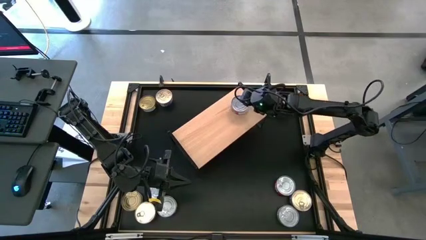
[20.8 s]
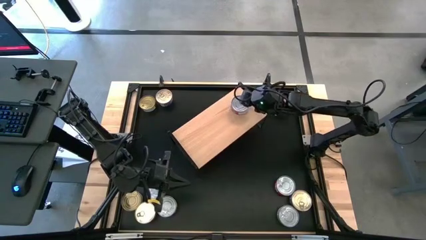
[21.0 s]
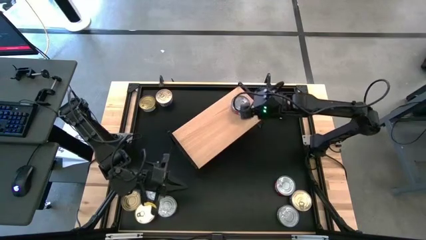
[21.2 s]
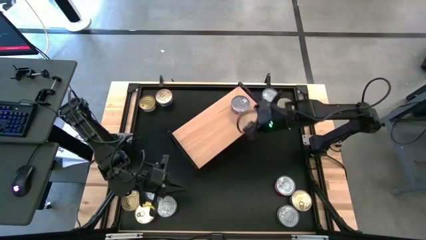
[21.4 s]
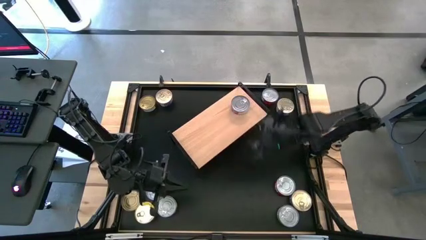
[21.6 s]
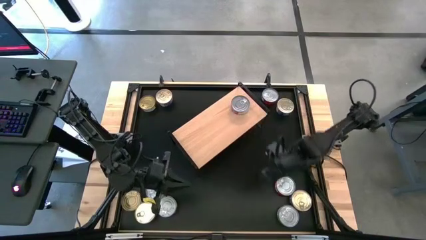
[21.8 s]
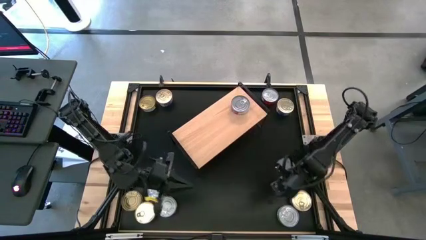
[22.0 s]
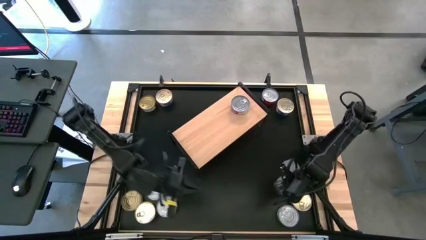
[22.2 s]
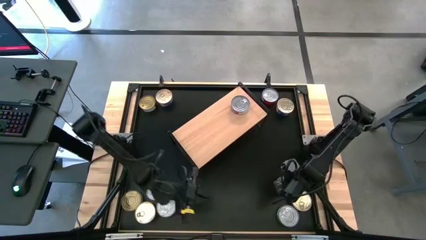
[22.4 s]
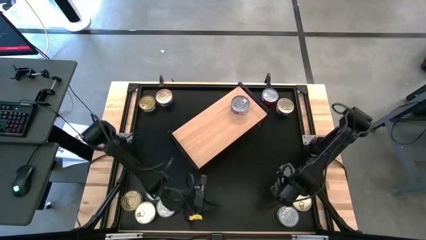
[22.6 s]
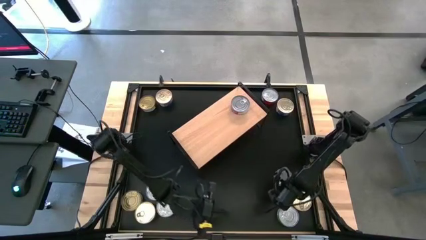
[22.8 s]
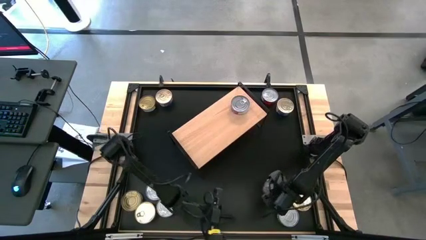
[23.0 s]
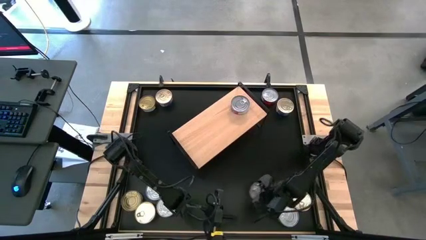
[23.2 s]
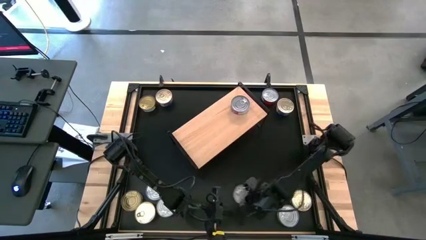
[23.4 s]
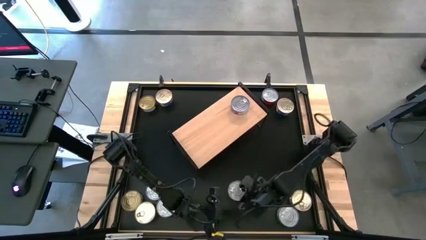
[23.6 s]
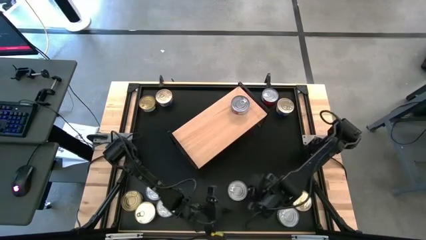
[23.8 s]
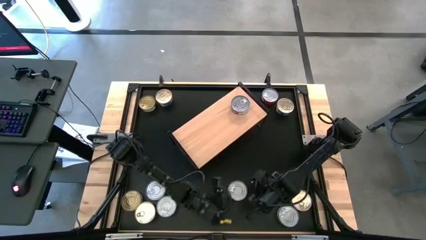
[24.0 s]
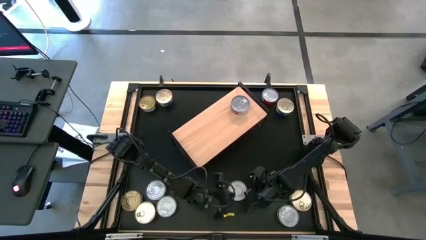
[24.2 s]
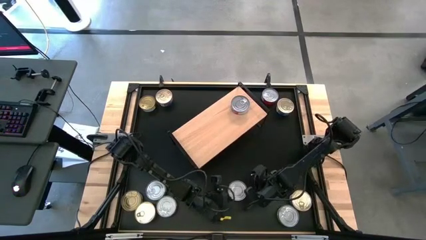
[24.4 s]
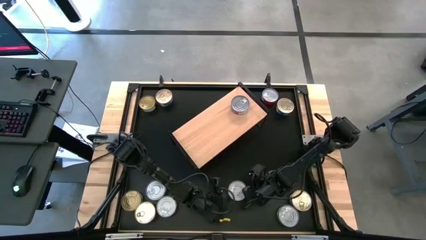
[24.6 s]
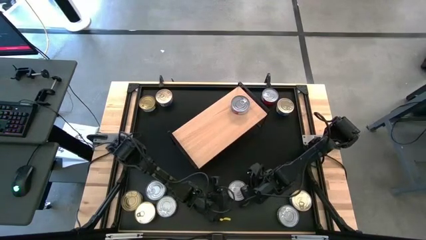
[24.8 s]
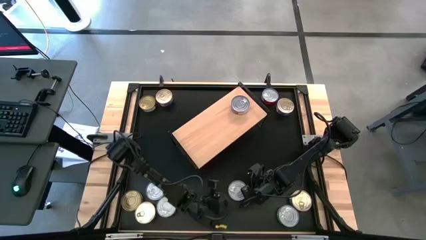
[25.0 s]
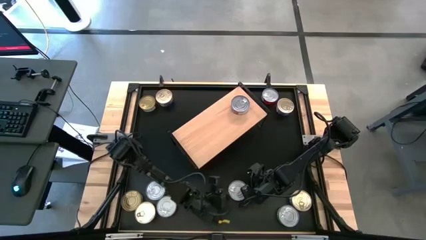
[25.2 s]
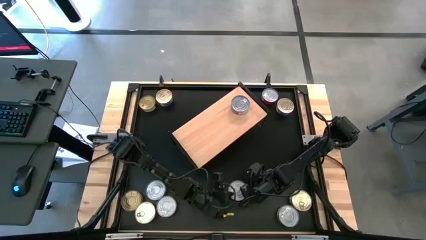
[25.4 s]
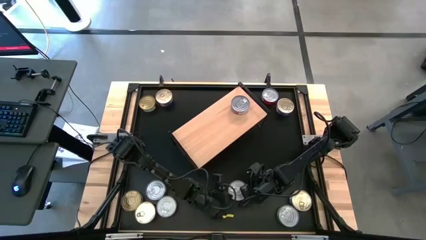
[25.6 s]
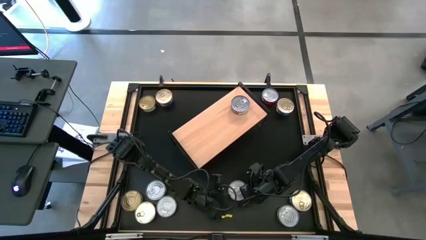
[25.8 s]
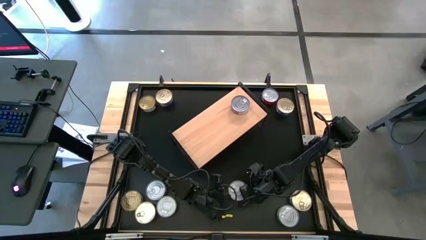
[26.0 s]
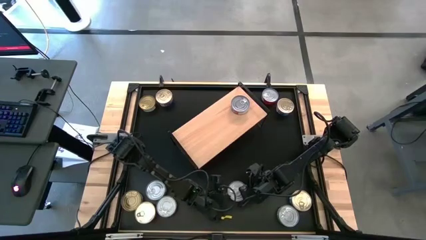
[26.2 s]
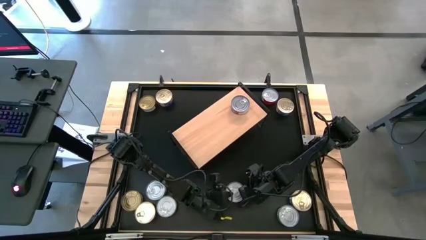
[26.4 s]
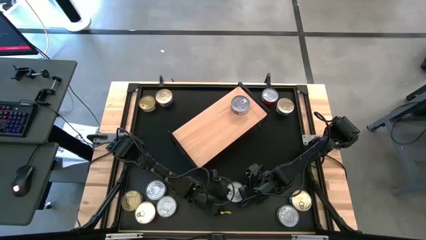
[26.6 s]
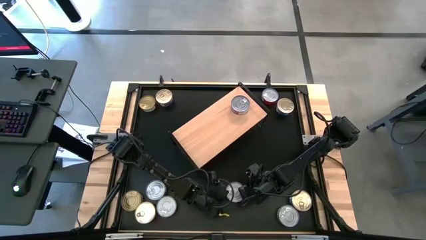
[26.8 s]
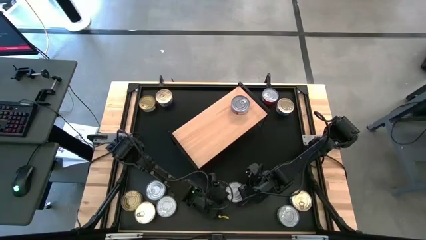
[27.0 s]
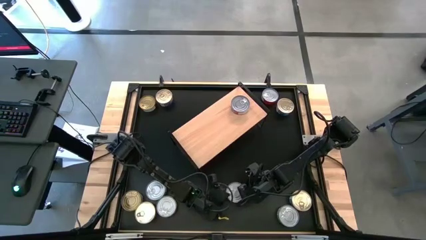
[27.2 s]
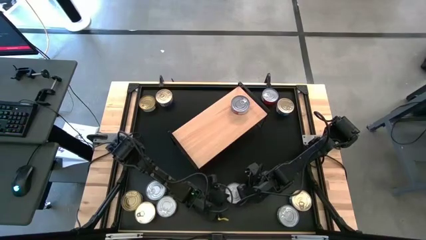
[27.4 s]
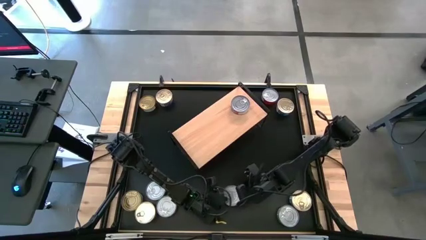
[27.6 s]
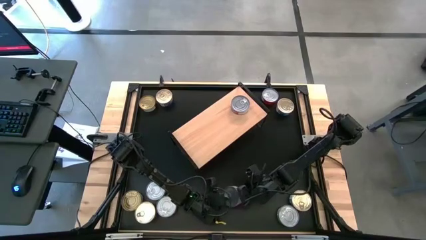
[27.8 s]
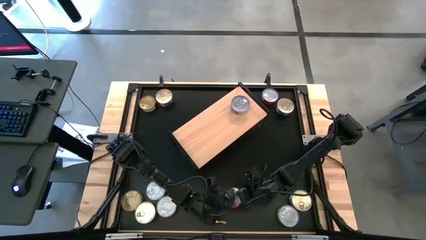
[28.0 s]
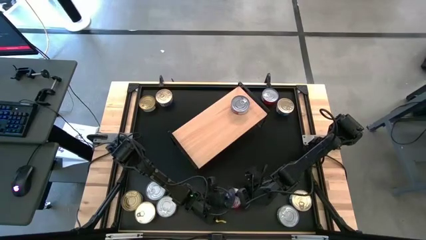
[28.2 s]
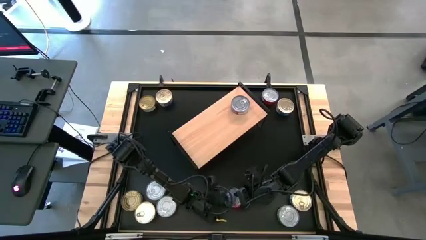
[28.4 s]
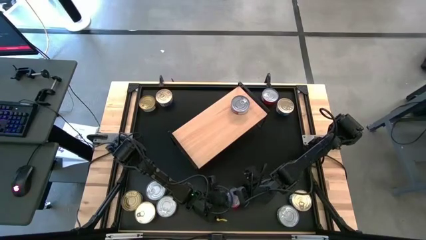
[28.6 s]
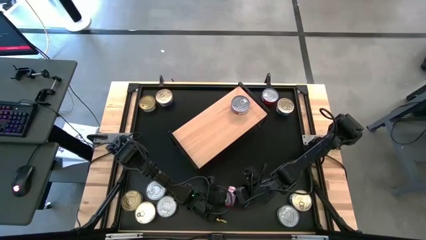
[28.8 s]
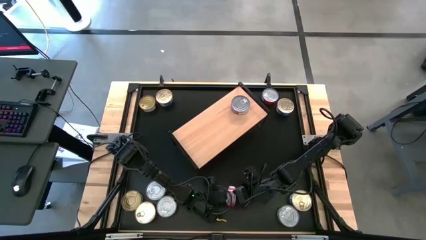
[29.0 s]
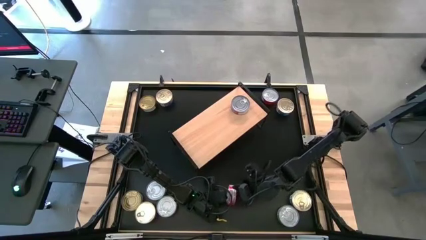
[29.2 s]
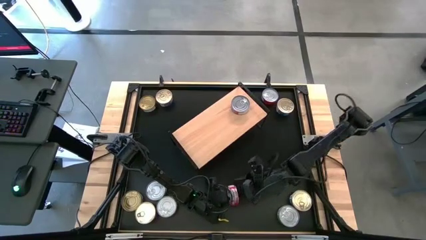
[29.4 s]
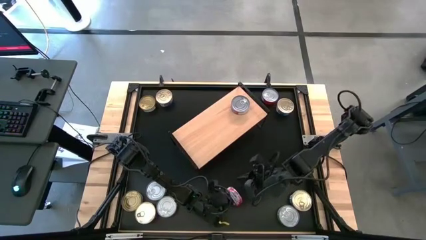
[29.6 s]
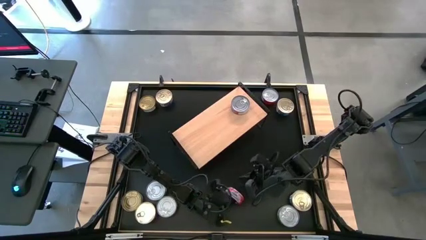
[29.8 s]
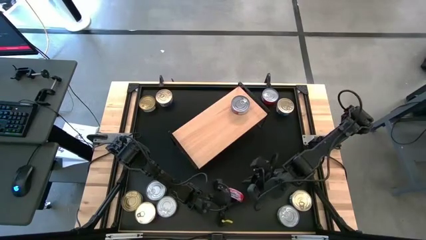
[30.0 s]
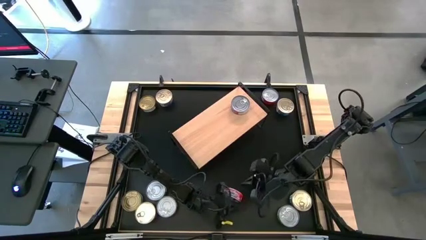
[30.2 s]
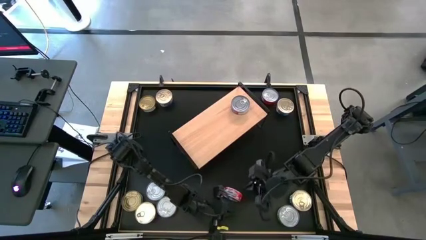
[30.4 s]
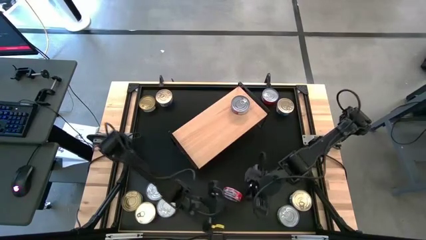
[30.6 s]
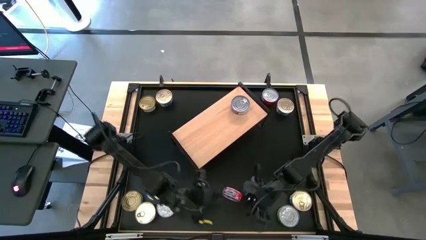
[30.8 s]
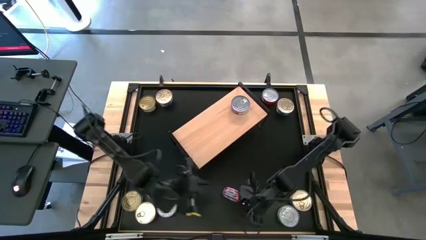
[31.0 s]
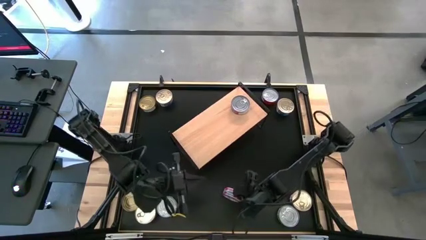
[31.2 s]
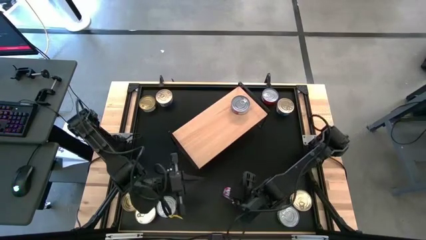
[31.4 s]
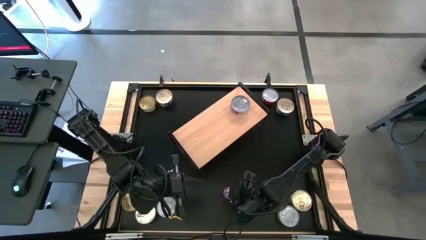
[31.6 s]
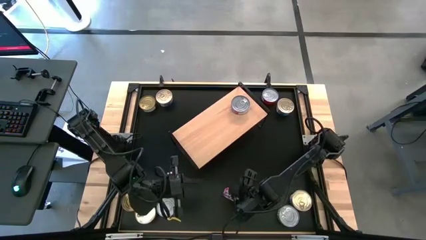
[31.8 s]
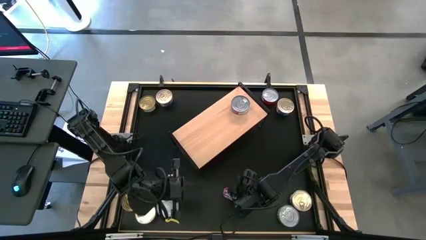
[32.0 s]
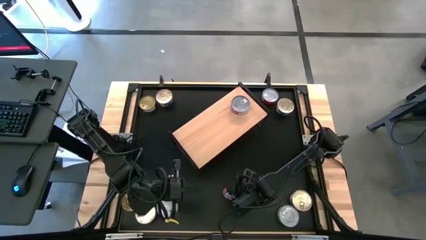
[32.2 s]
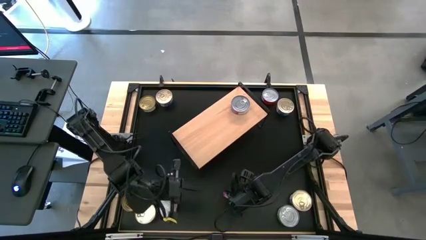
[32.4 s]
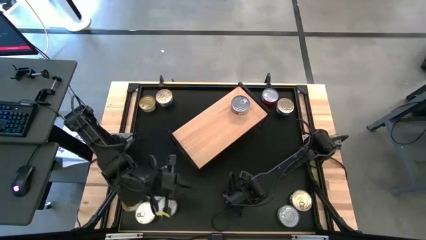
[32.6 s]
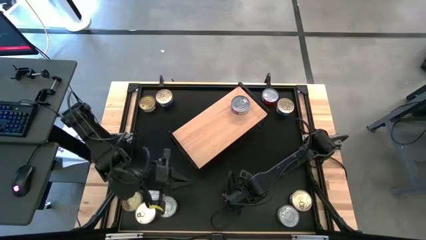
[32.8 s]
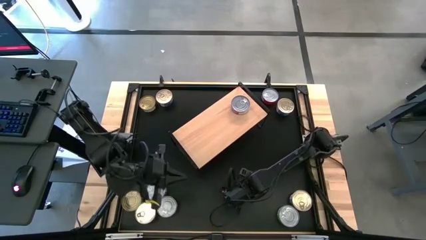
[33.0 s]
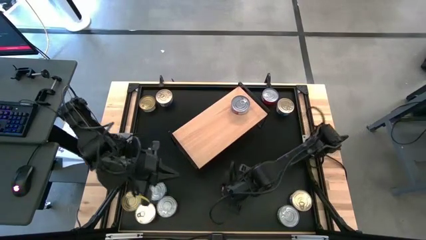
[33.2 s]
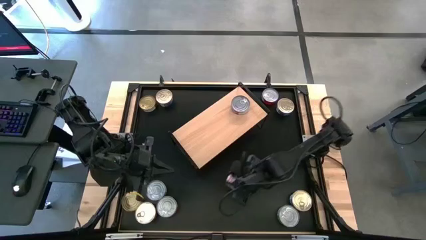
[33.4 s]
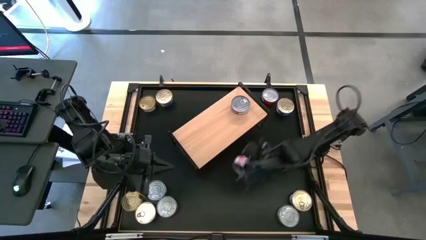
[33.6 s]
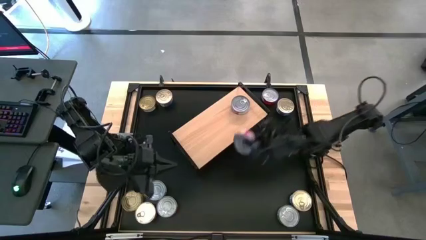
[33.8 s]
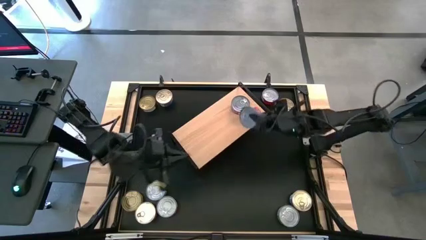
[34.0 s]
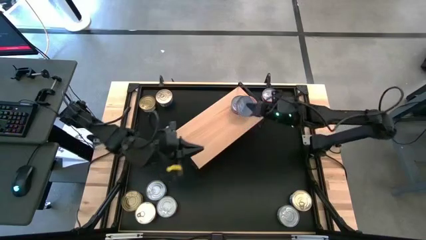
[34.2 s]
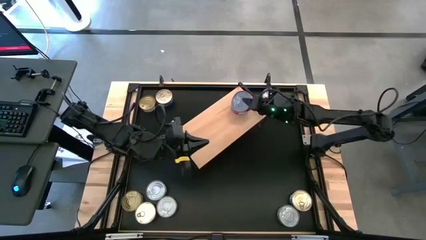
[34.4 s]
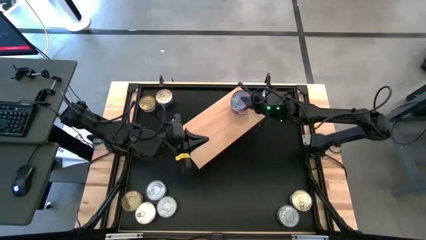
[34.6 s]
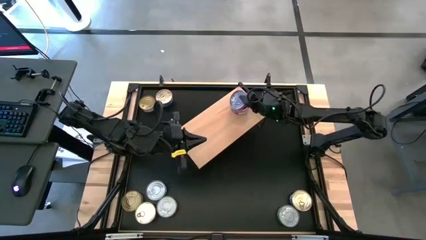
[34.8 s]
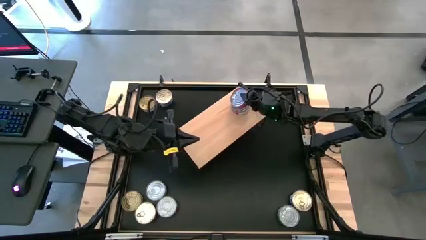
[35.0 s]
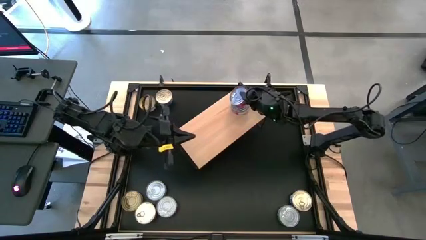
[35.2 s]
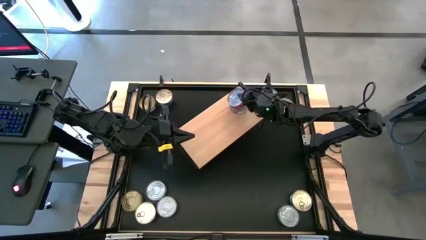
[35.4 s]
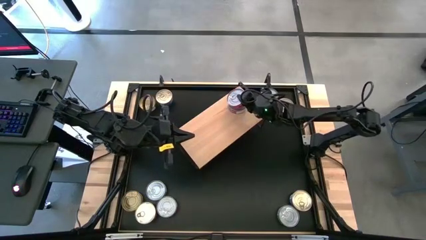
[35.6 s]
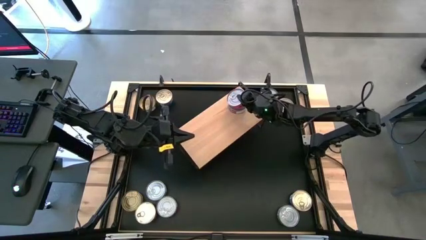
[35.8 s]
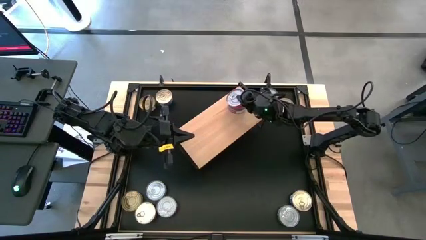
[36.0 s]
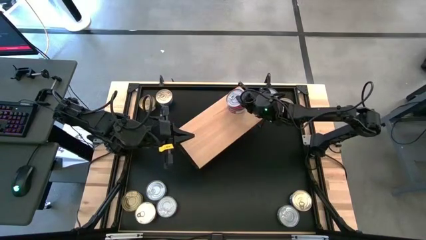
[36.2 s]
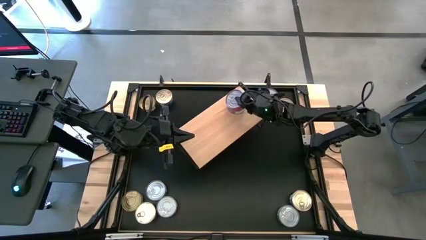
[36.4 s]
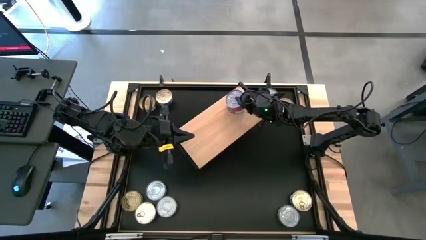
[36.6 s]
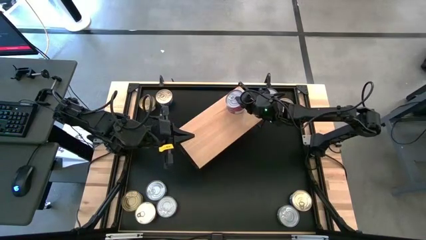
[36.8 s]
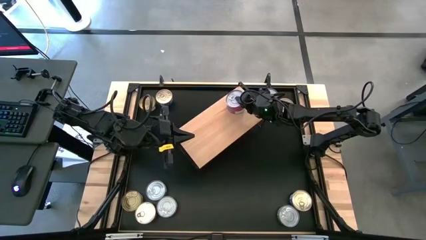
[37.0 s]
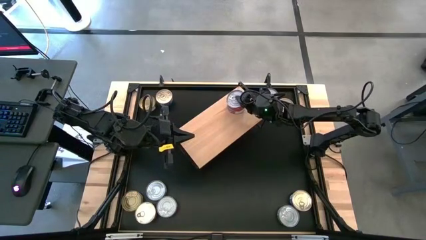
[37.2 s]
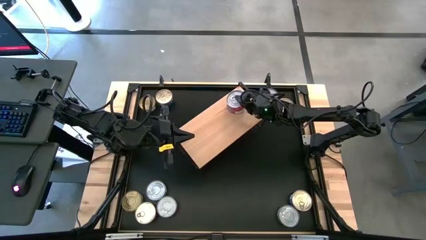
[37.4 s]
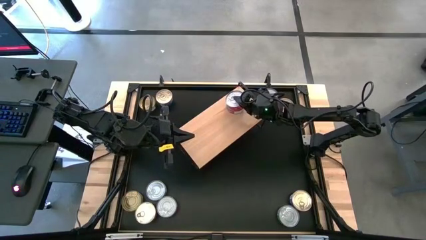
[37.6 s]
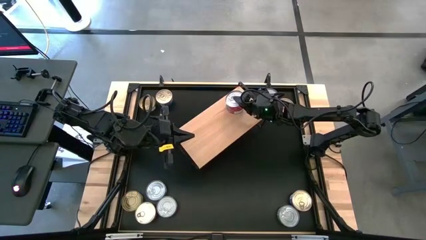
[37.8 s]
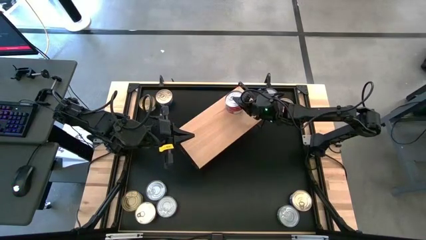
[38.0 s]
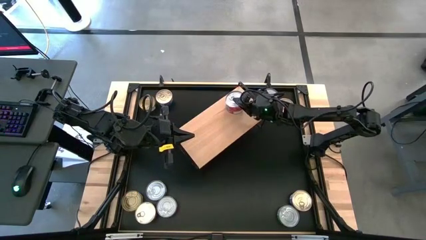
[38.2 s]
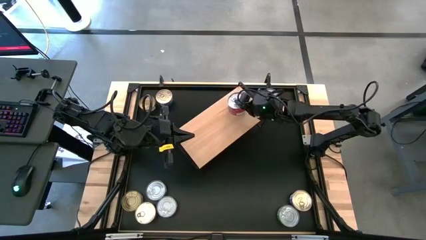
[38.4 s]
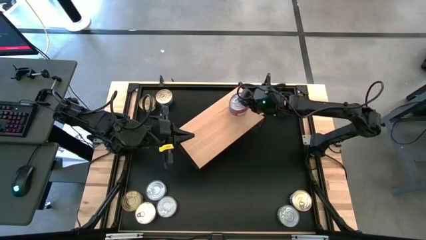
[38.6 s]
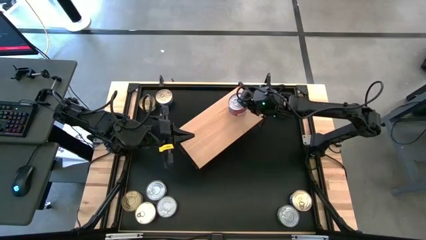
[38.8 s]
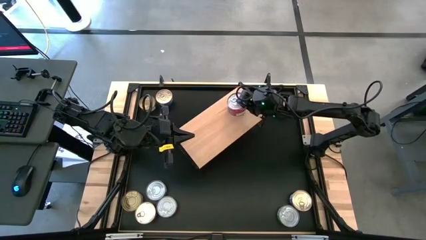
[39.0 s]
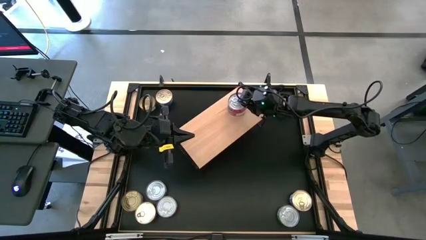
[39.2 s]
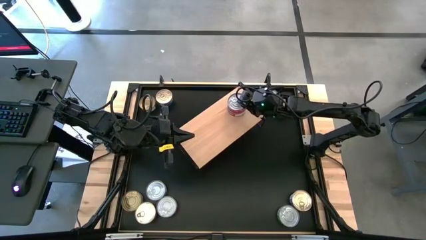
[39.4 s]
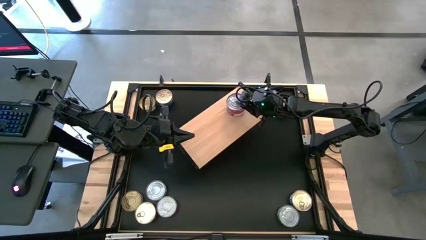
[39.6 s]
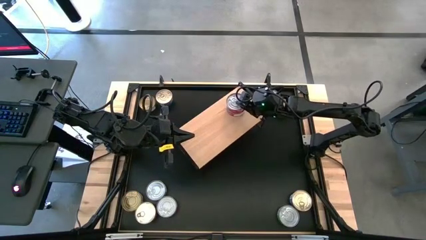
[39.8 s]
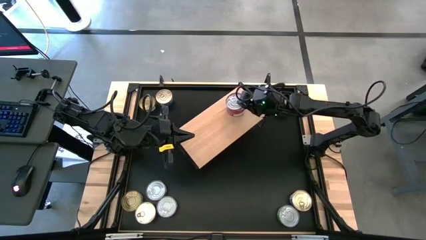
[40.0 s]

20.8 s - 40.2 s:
Task: Stack canned seafood by type on shelf
Stack the red tuna can on the top of the other red tuna can on the shelf
